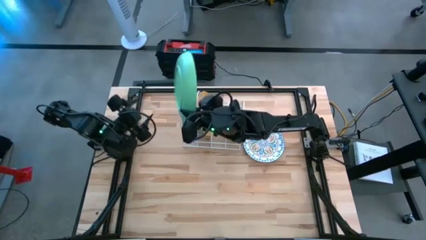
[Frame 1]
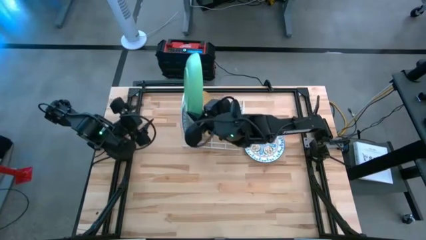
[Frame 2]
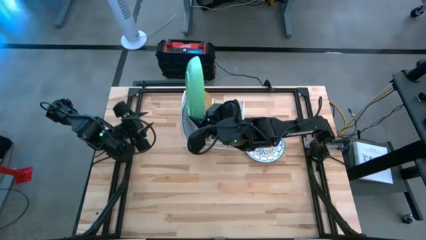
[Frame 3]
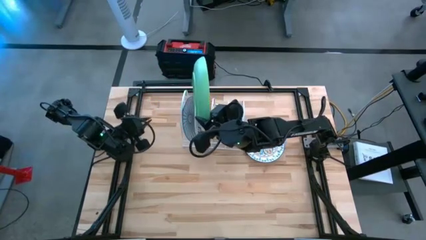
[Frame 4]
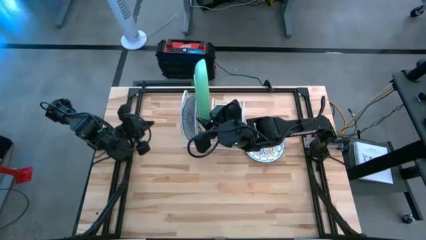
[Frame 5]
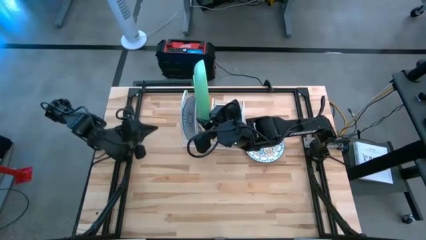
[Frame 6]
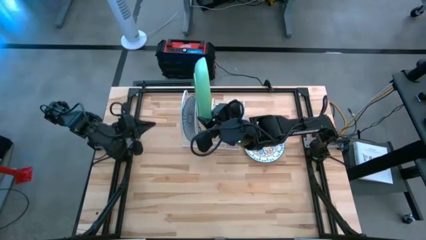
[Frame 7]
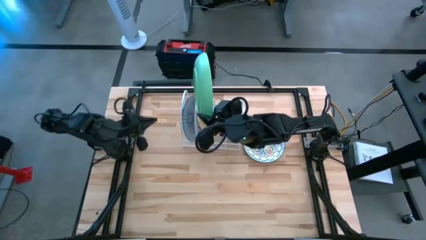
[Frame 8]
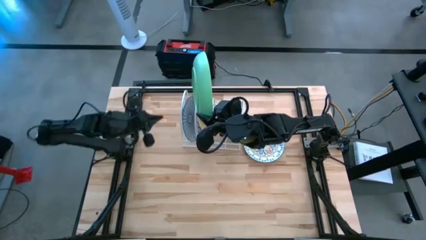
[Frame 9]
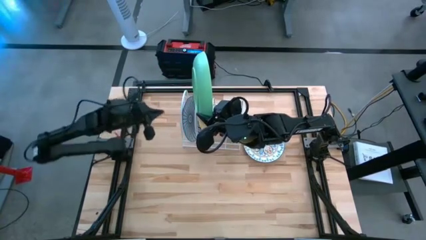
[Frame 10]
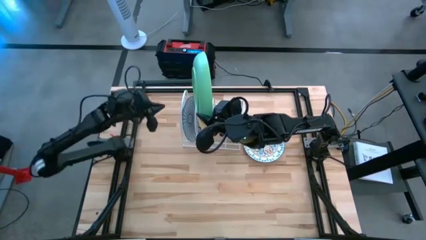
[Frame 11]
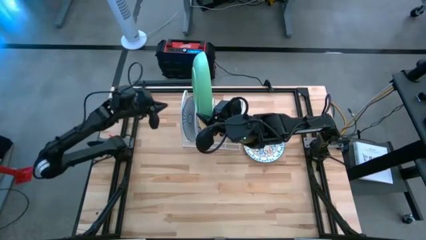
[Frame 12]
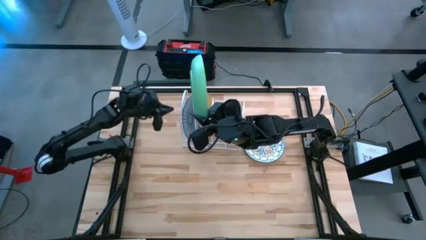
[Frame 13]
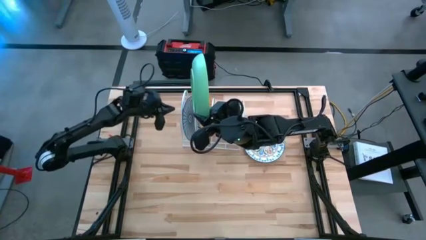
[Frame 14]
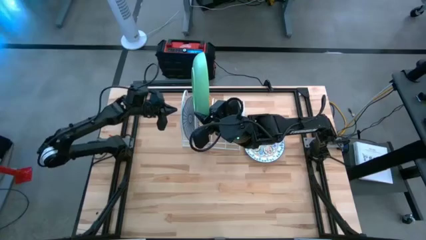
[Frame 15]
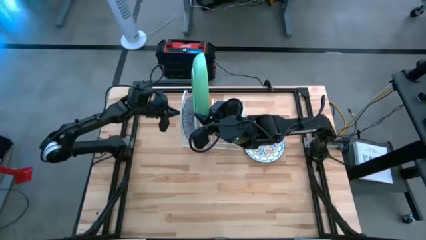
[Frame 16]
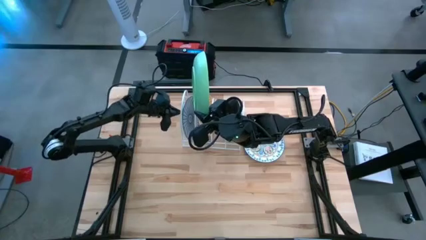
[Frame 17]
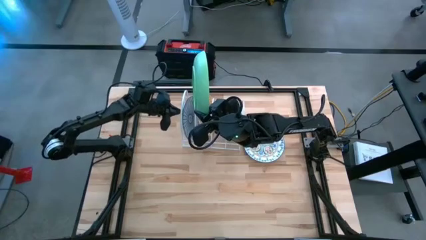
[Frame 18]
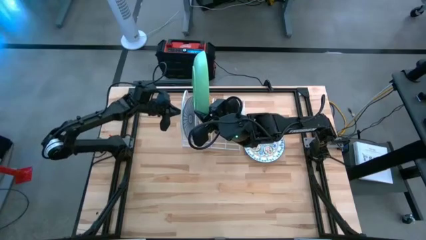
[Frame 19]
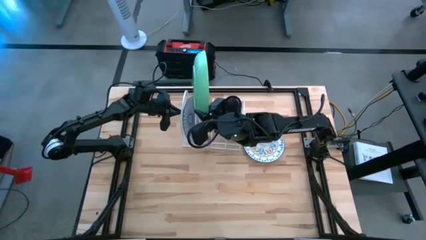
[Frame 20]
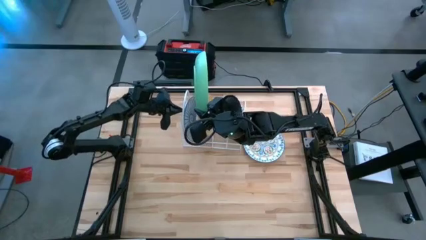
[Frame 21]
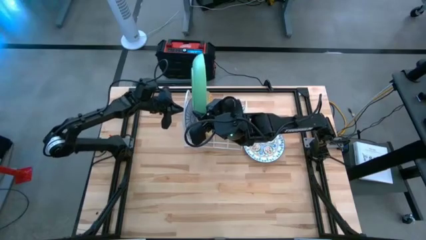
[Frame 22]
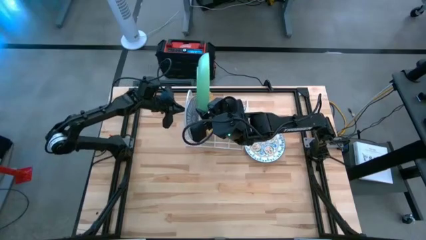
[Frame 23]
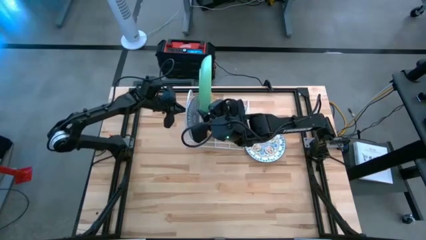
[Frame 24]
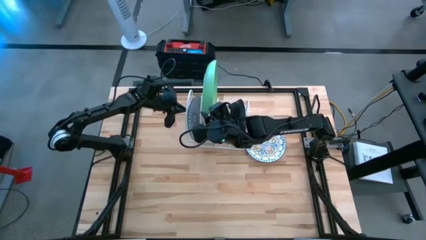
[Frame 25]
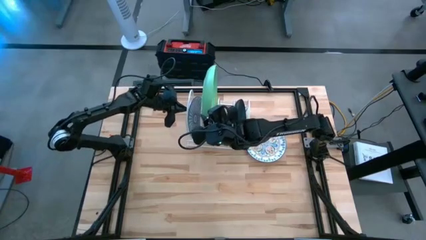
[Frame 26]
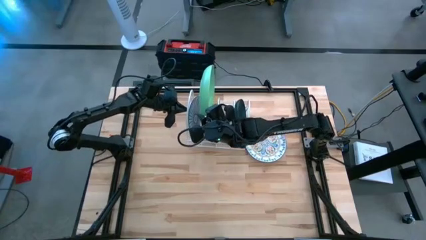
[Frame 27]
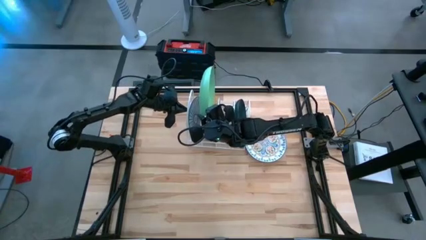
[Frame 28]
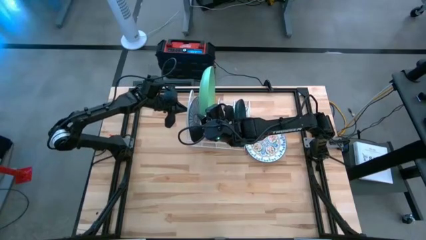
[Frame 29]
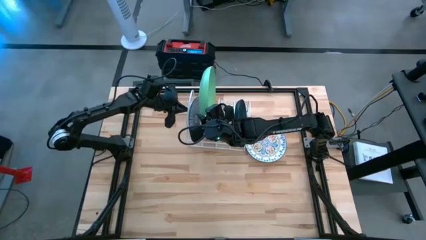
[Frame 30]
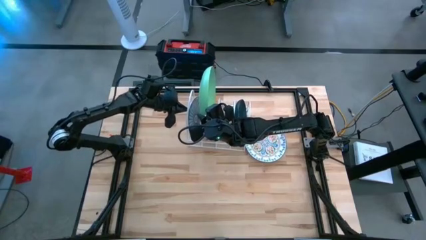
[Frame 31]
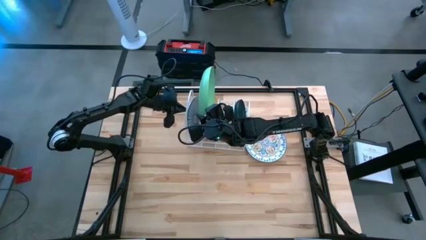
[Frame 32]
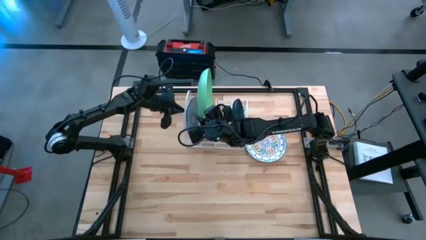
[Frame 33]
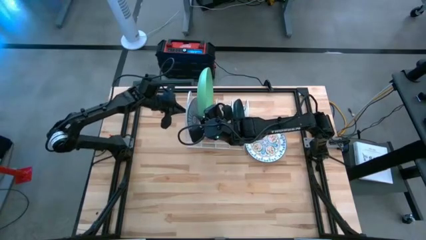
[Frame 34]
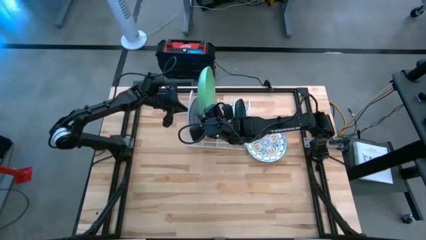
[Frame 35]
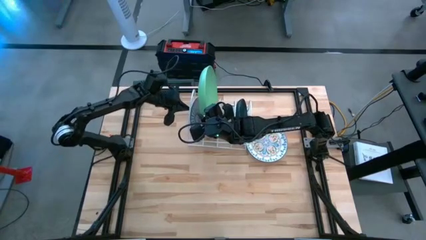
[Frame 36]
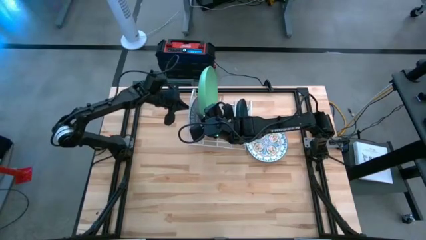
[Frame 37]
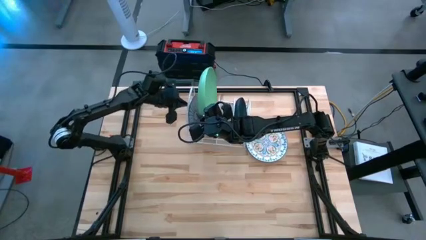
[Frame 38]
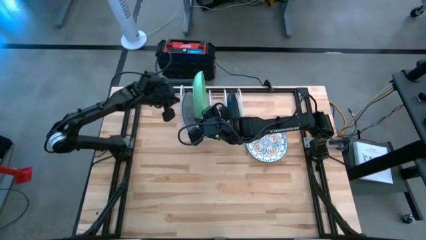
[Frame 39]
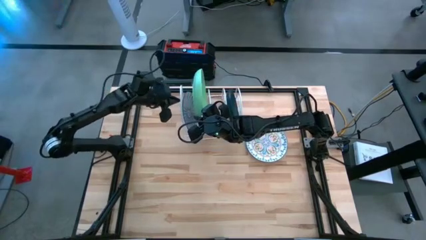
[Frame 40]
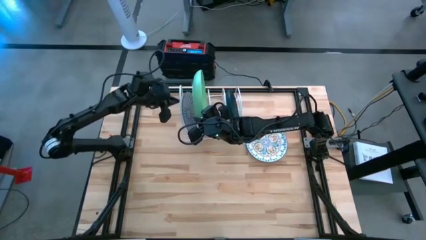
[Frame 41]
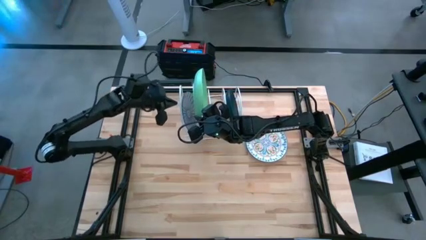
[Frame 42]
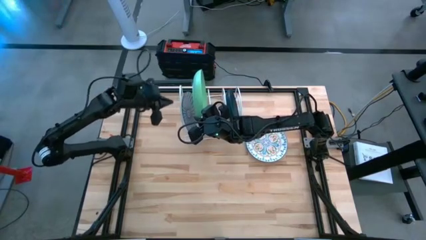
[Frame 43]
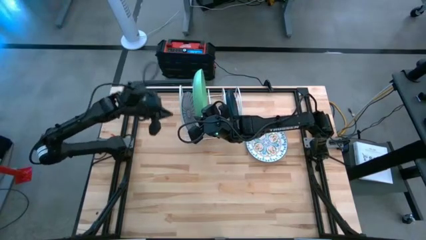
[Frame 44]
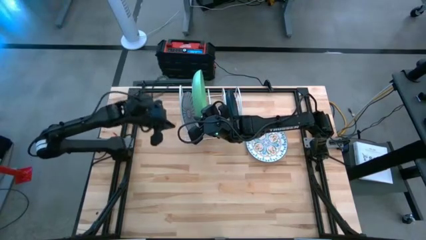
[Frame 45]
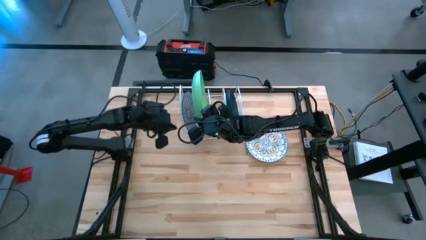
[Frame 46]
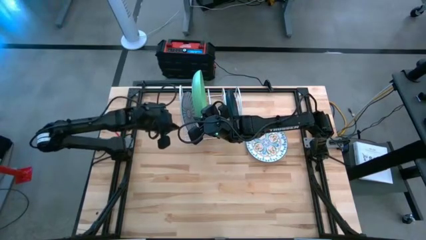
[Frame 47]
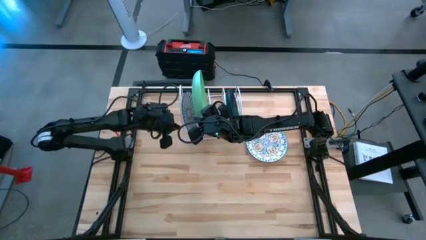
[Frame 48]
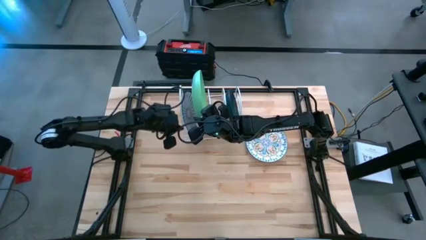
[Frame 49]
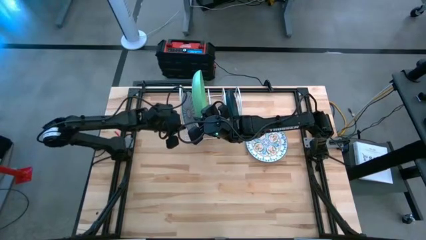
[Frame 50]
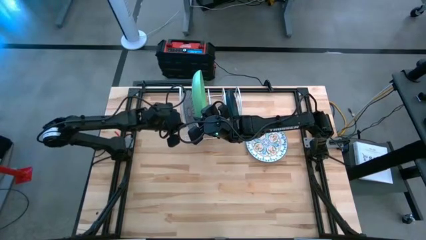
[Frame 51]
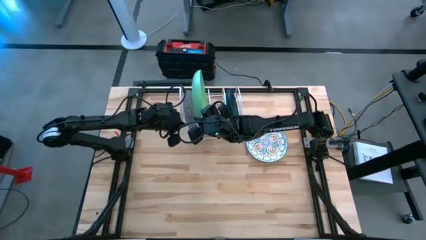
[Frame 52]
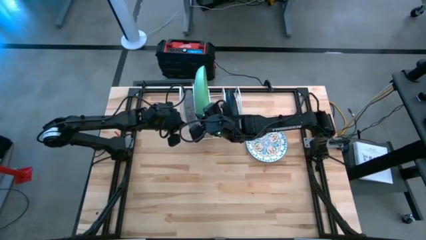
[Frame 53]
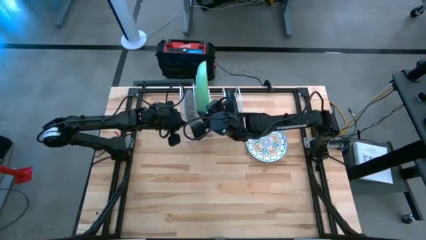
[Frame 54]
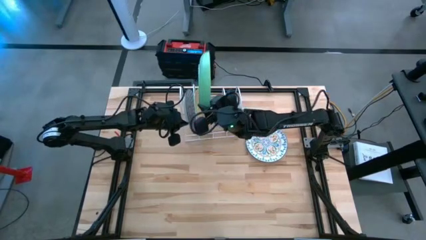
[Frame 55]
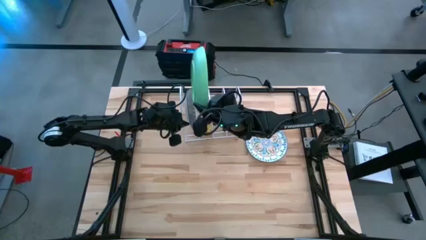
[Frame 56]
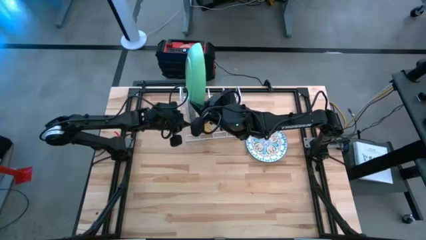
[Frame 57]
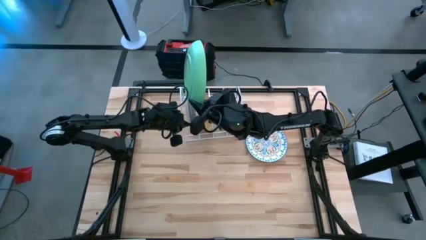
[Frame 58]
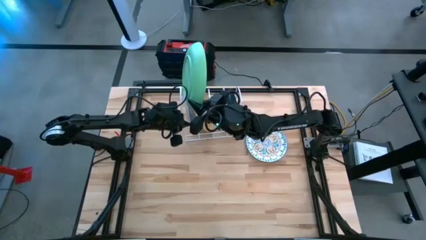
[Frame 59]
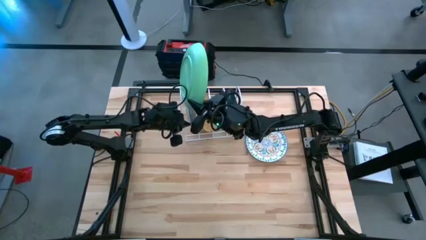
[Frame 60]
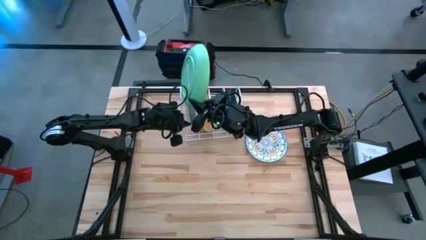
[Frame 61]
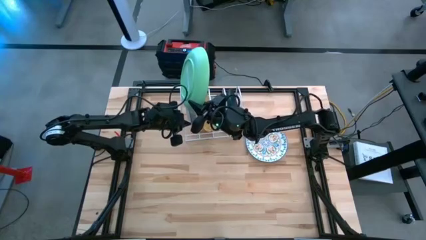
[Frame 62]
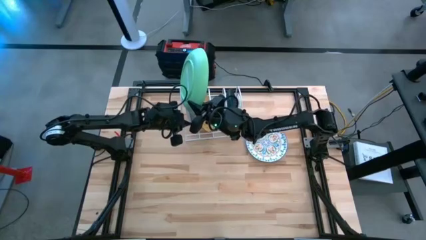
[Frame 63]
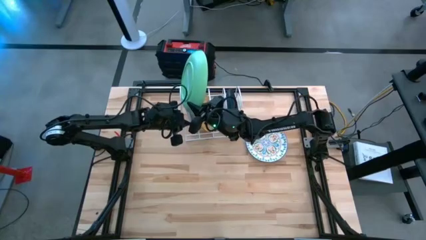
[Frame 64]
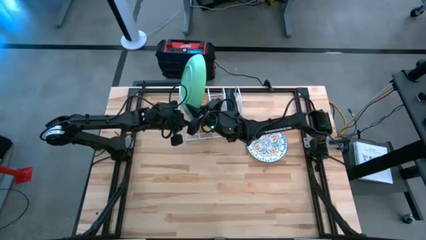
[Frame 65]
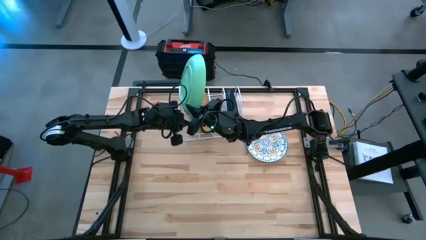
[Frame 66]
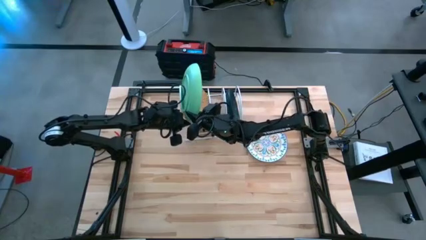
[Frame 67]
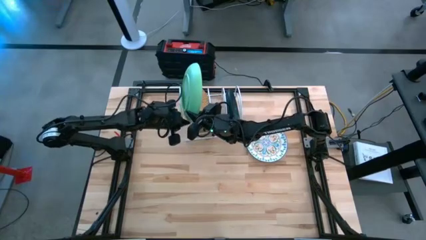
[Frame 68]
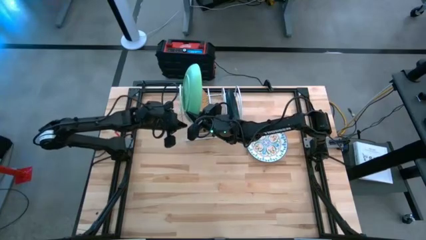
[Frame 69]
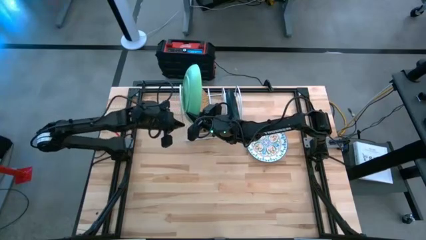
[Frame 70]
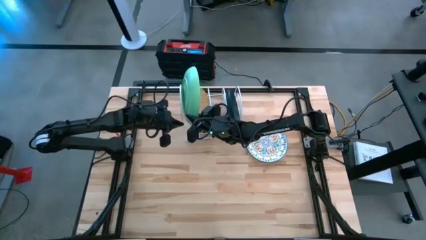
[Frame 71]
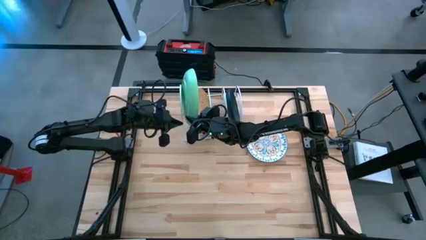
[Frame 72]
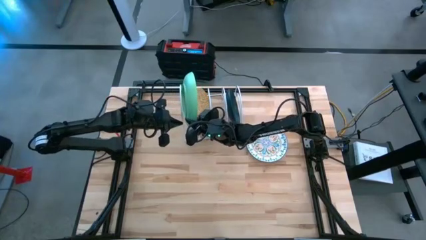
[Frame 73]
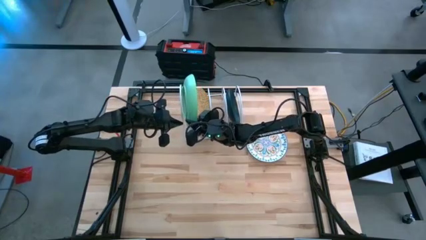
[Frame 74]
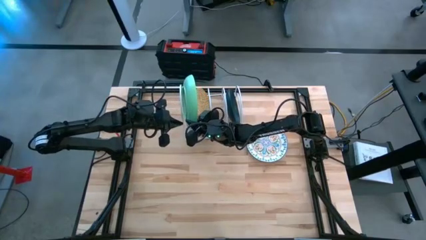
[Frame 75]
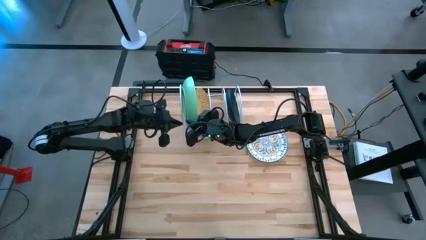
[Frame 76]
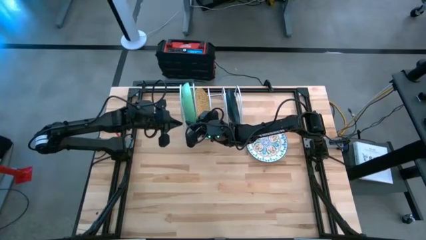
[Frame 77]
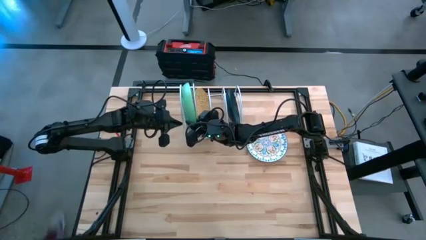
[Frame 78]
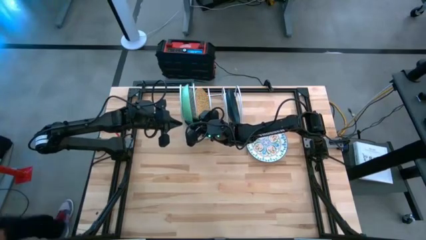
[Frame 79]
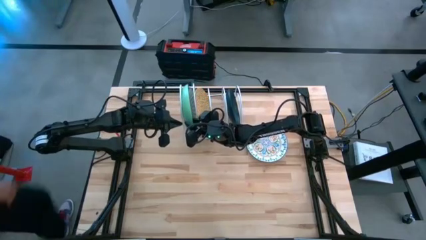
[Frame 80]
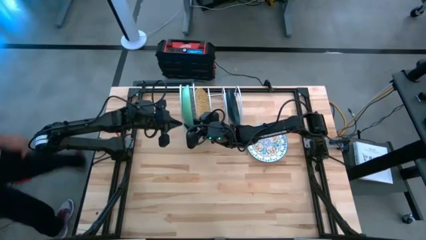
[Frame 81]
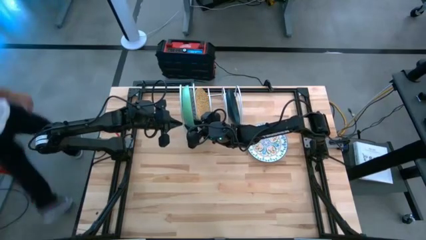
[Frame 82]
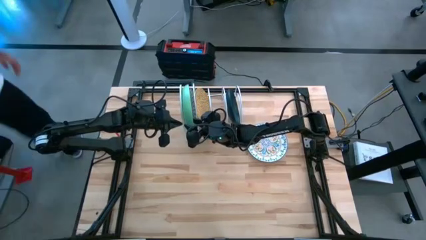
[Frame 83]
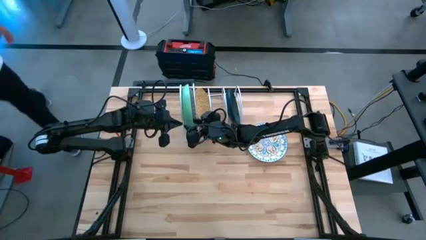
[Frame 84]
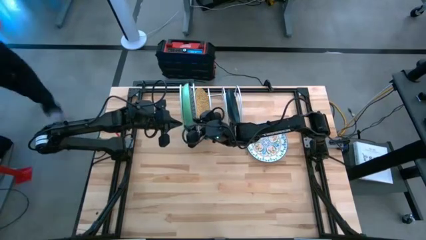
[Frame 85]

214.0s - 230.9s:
Task: Sort dishes
Put the green plate in the dish rack
